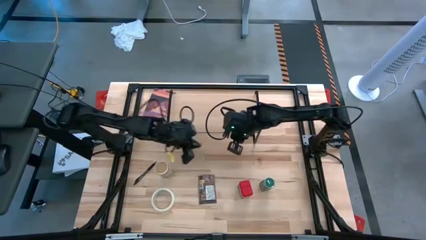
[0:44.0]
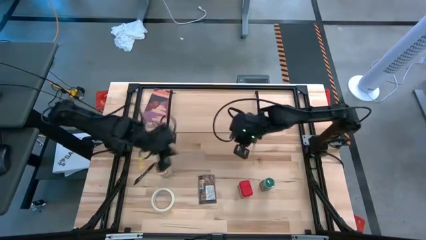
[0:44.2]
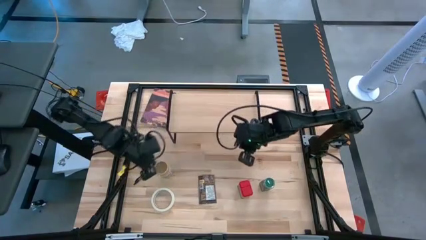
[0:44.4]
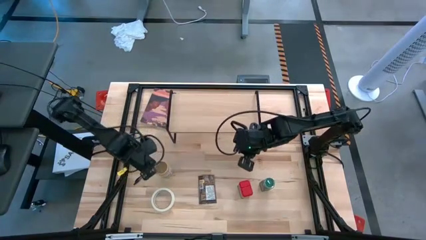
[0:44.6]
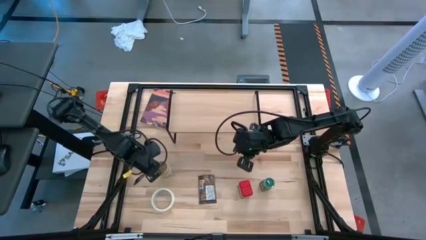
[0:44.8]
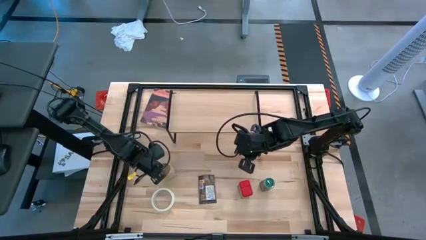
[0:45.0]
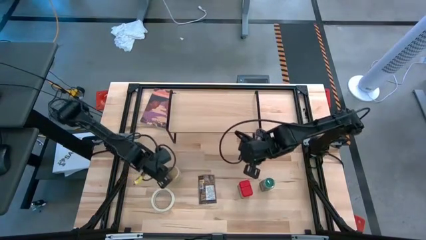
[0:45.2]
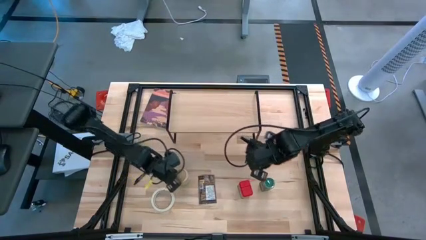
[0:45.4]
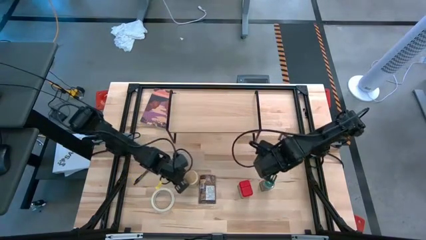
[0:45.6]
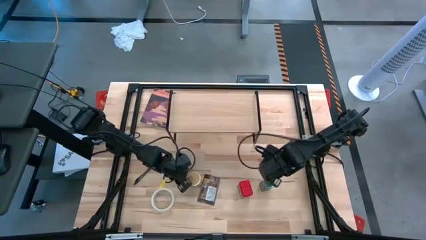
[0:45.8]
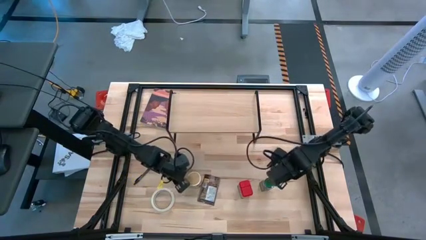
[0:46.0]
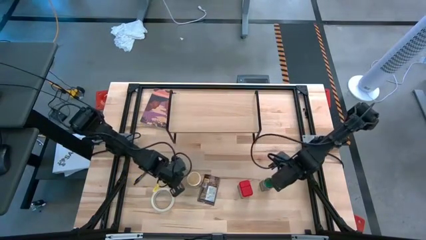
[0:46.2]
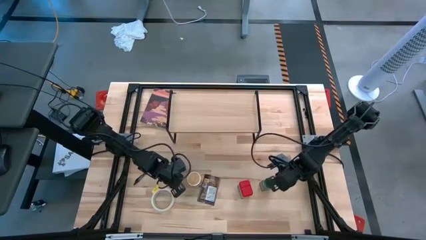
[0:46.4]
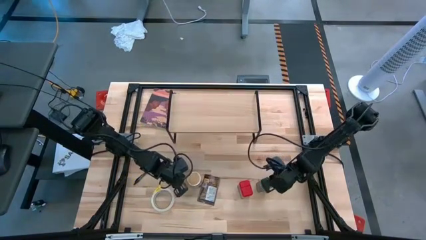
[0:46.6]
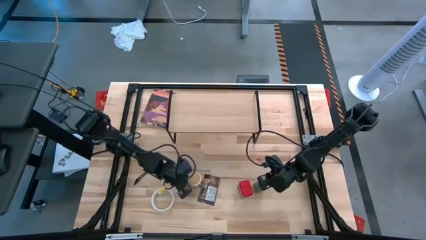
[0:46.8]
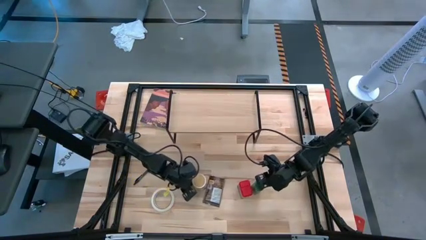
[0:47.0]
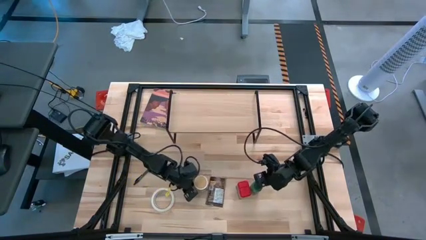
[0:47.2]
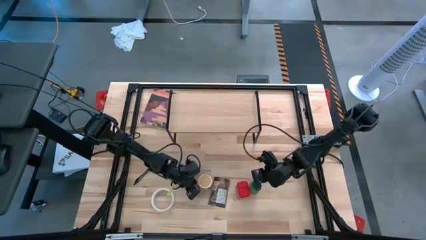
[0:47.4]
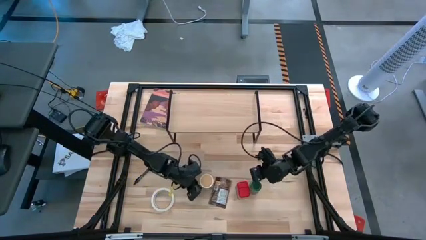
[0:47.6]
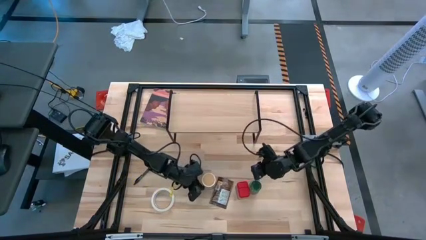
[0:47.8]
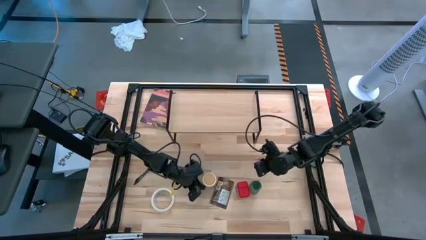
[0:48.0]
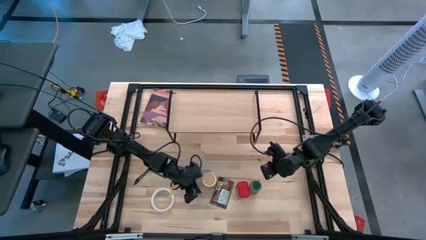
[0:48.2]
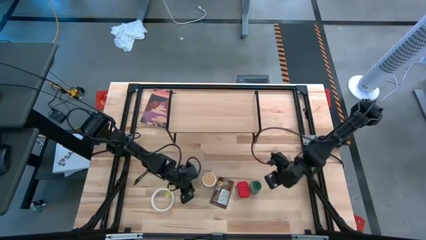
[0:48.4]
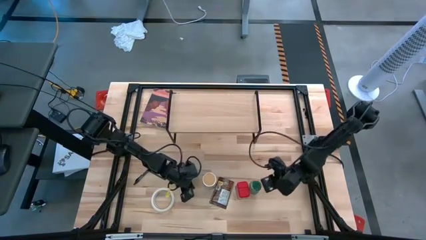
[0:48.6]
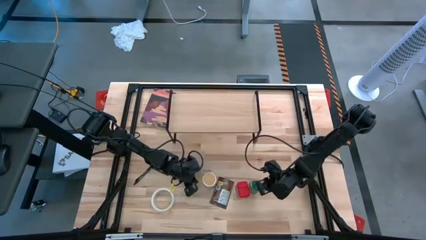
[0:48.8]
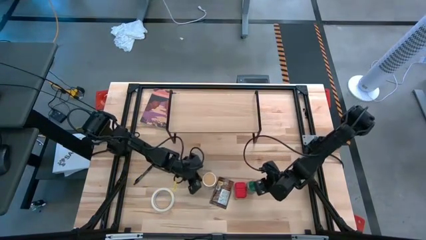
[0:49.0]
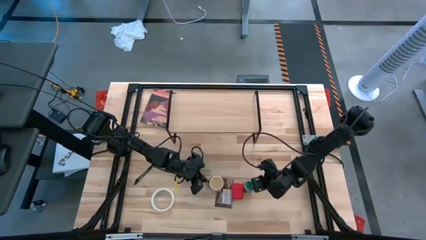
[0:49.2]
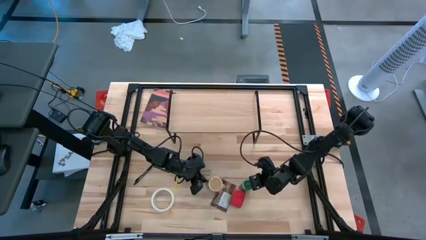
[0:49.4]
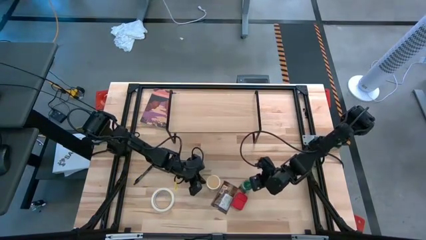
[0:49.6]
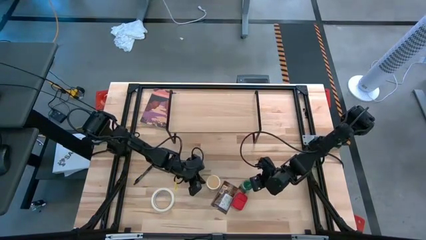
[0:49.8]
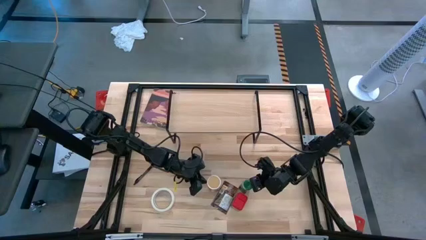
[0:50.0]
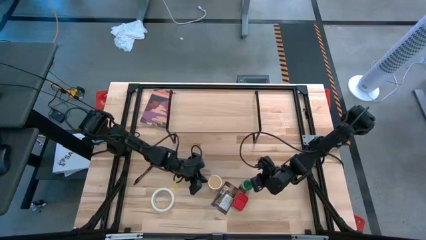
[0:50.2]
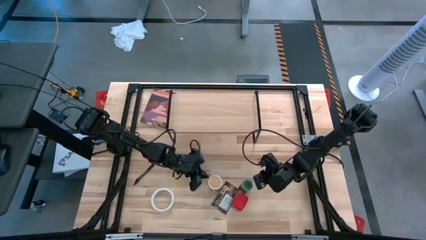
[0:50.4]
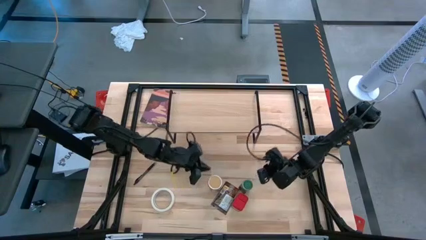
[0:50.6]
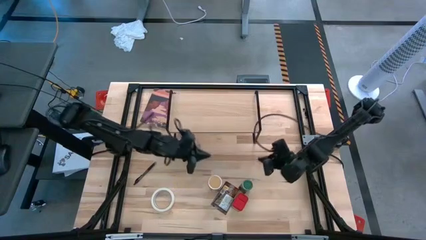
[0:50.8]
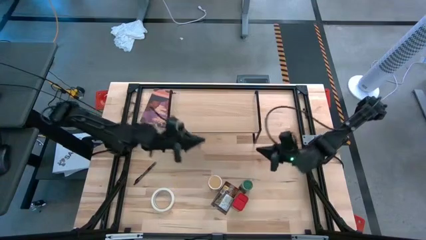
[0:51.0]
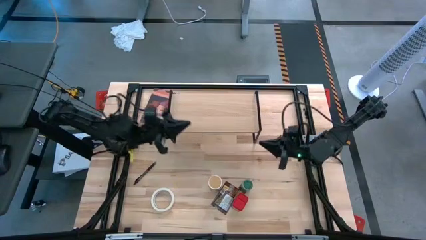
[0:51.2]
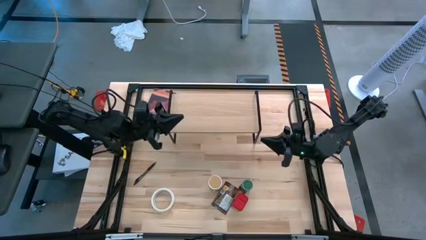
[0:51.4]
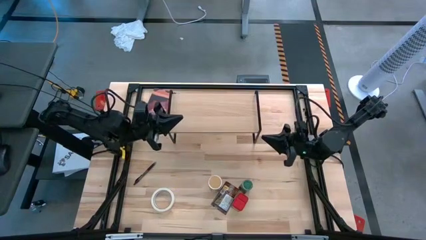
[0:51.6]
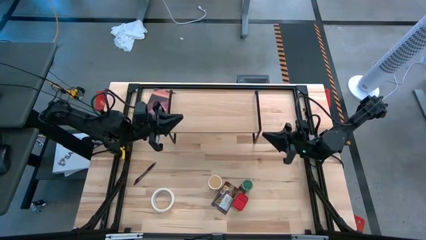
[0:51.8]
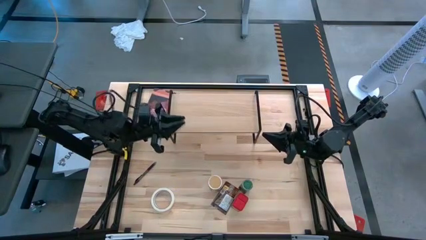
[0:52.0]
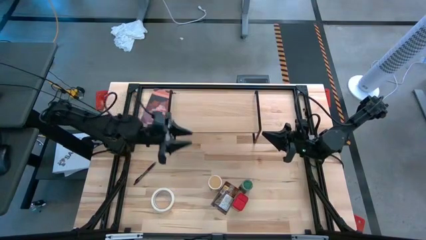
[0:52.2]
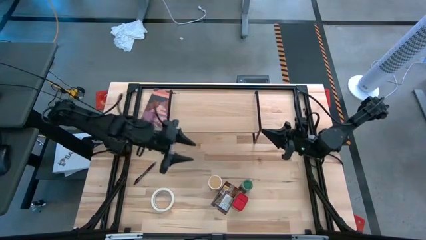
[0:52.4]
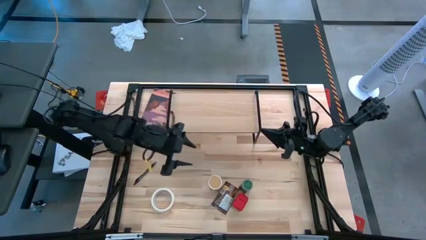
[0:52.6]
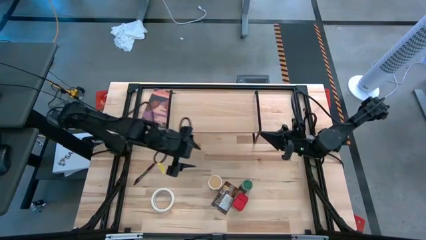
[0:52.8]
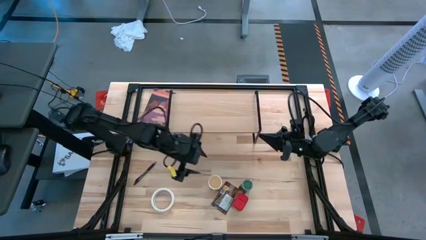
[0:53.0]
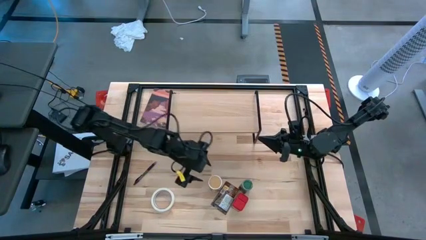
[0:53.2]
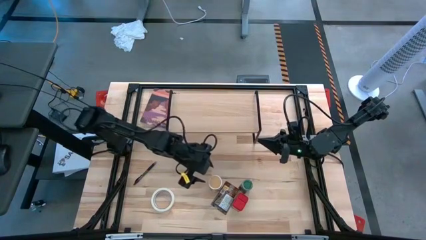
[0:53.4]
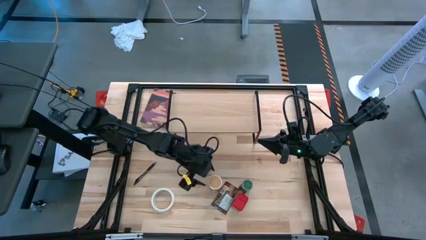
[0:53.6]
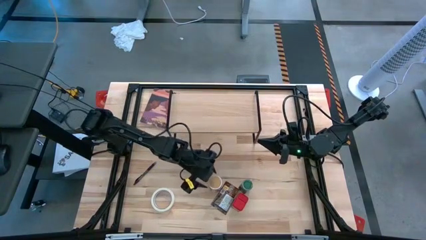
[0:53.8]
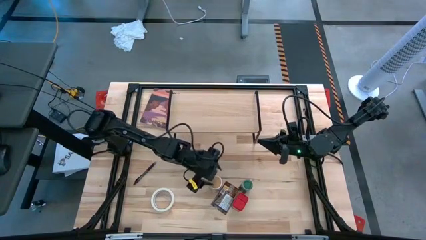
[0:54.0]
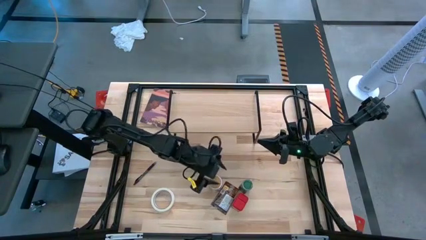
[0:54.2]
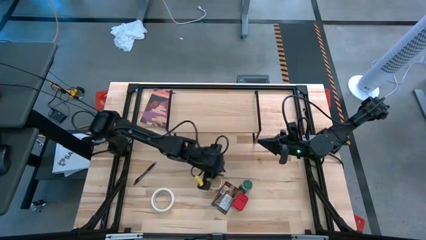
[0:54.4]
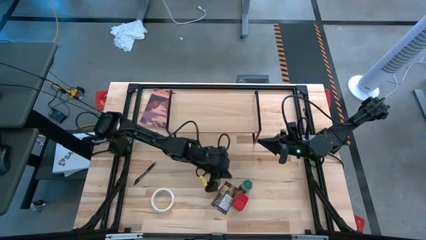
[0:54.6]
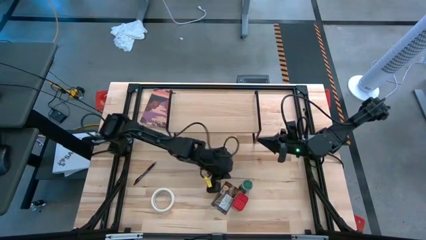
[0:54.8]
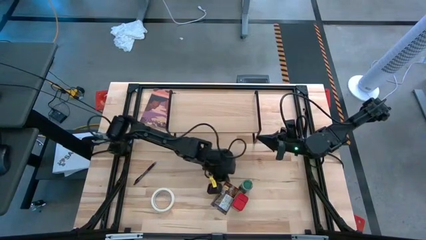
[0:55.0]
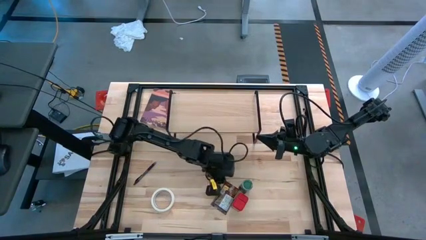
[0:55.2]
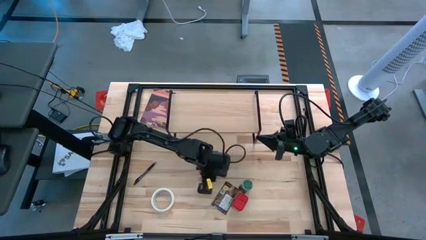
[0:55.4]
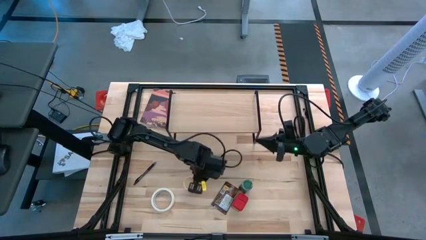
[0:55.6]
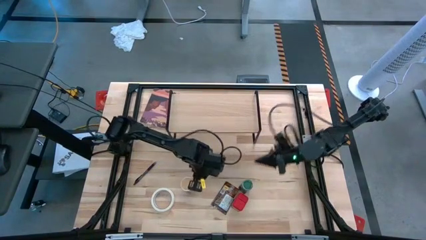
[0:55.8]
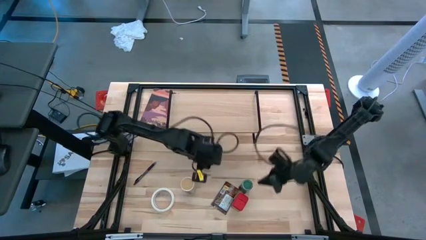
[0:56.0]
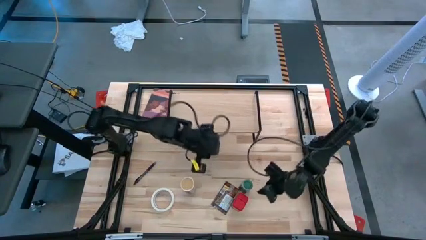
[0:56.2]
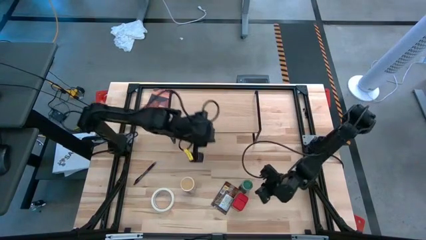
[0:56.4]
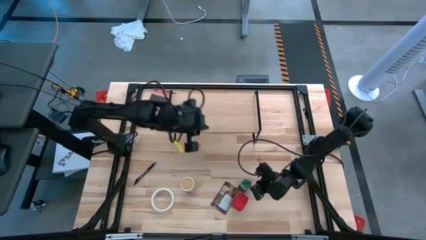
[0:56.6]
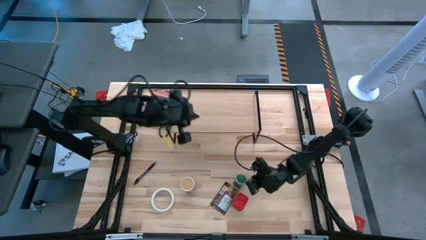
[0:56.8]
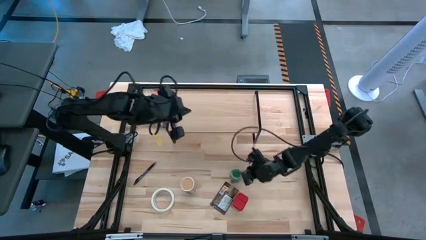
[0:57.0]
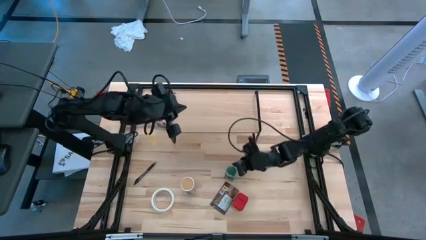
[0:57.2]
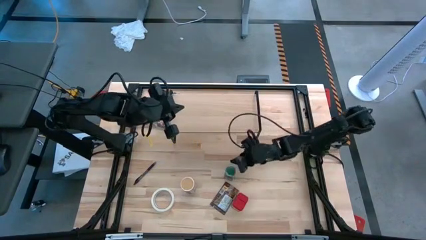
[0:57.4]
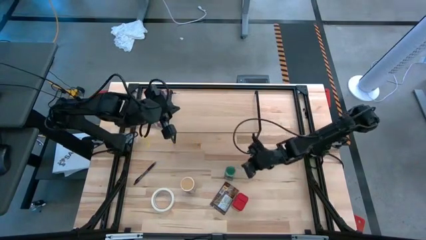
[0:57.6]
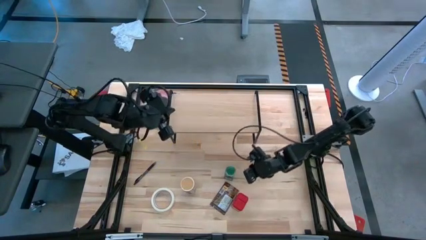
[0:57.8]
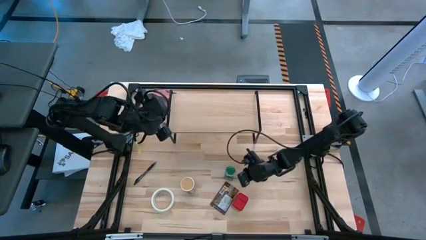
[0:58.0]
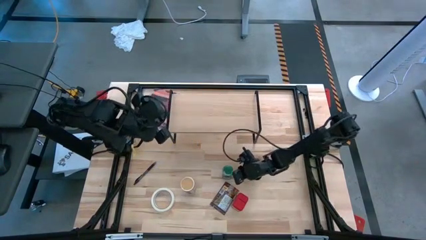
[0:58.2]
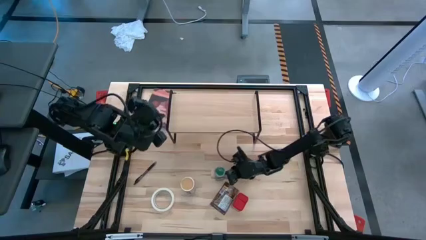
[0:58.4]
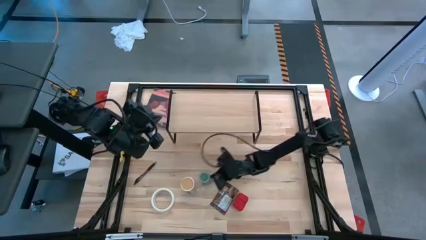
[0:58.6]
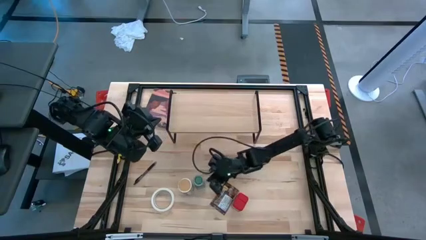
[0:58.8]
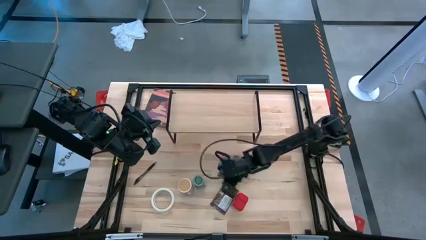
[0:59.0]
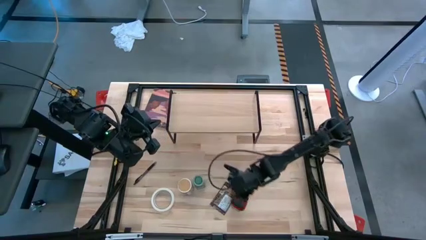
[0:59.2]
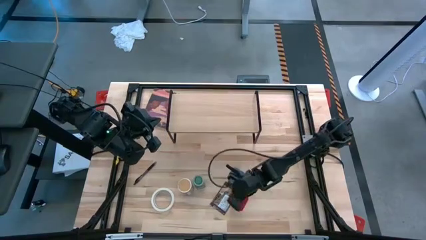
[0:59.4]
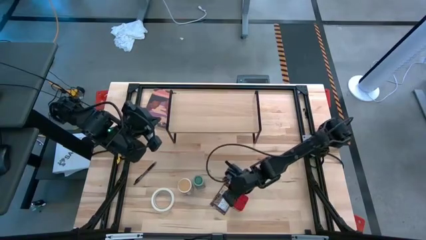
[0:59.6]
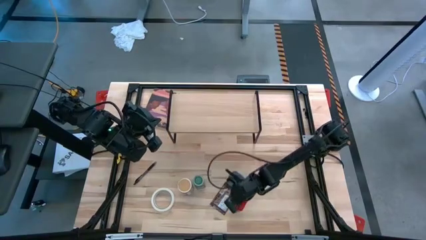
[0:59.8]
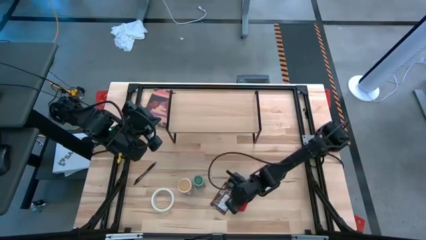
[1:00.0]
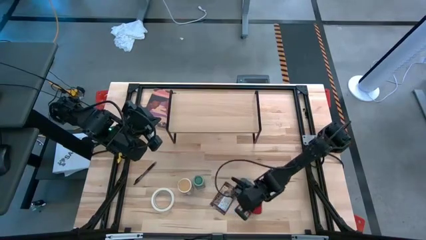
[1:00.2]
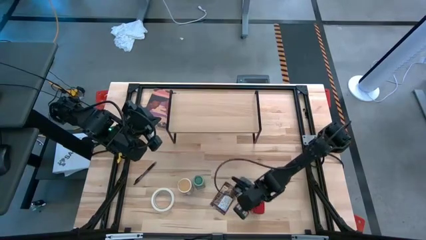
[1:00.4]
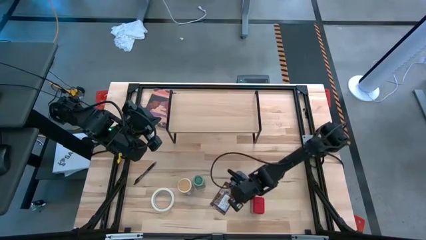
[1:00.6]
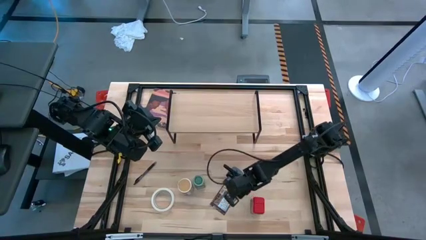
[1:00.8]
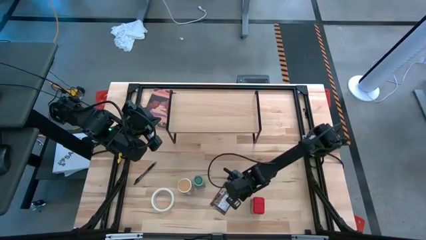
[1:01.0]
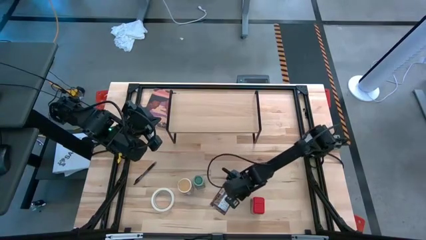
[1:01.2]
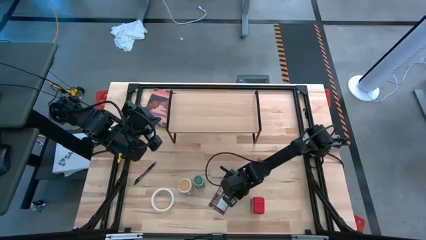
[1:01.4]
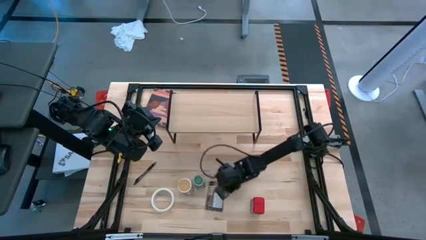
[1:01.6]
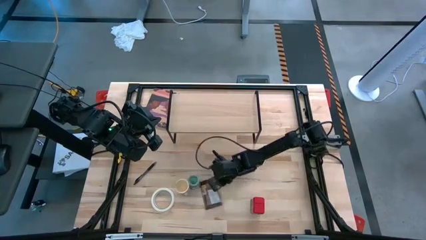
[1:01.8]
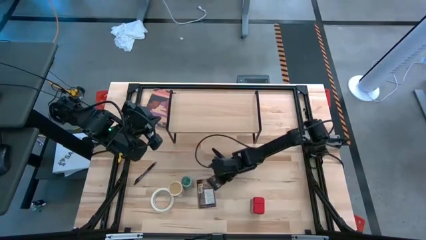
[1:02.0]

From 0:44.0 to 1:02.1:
Task: Shelf spices
Adjust the seasoning bottles, cans and bags
